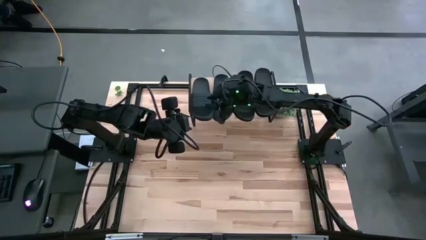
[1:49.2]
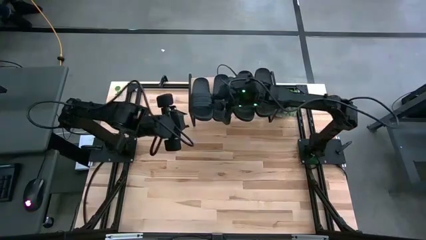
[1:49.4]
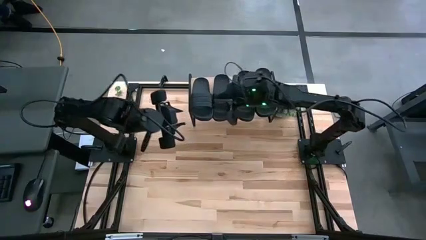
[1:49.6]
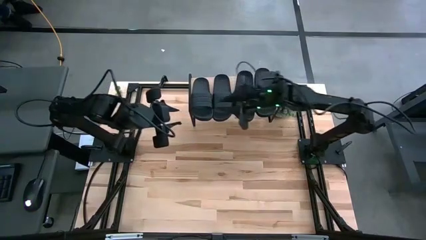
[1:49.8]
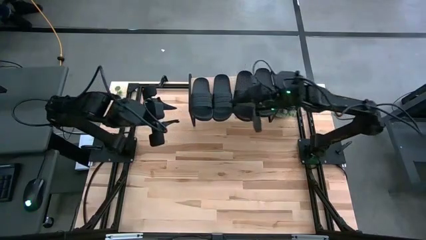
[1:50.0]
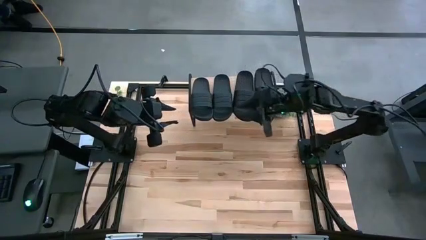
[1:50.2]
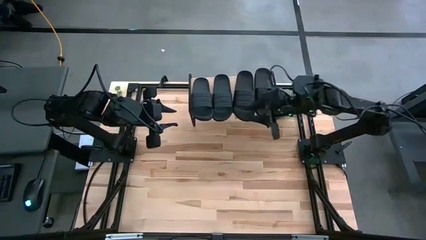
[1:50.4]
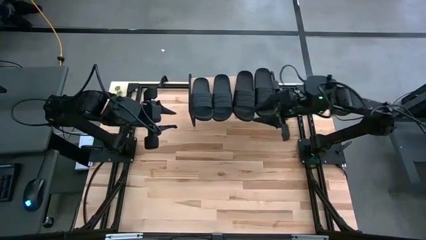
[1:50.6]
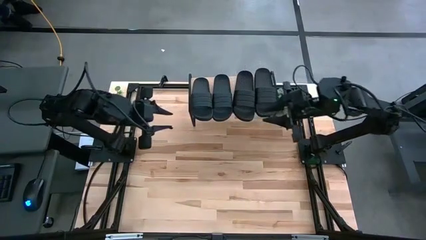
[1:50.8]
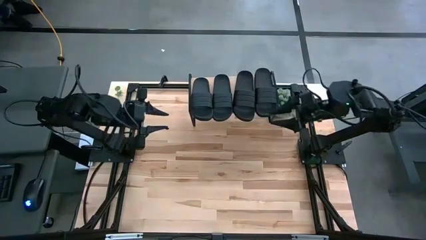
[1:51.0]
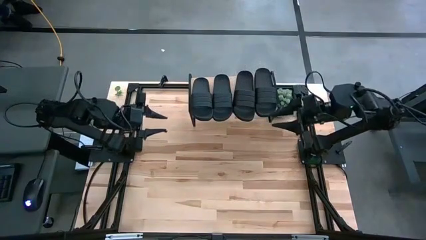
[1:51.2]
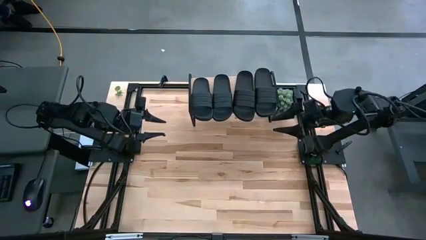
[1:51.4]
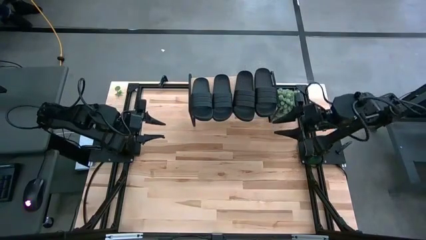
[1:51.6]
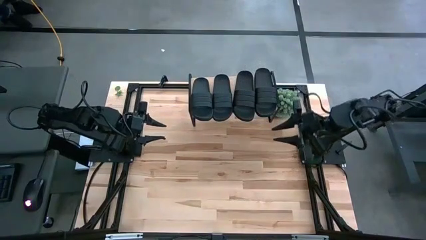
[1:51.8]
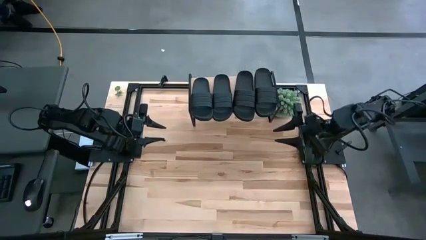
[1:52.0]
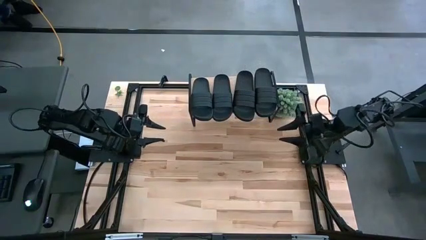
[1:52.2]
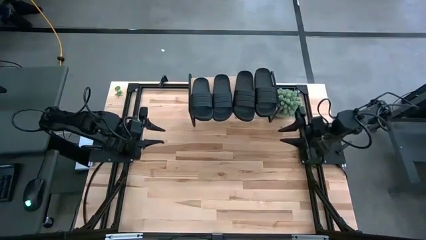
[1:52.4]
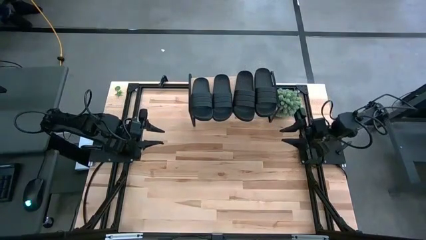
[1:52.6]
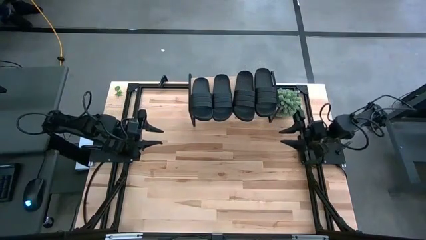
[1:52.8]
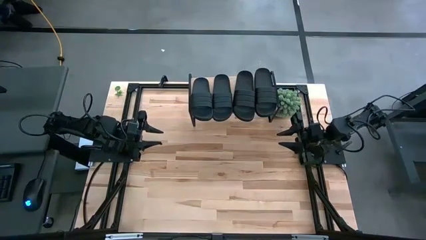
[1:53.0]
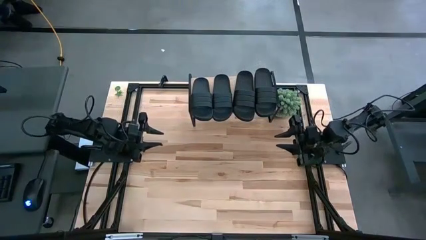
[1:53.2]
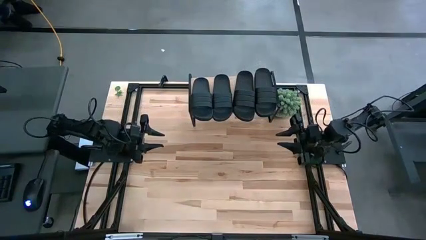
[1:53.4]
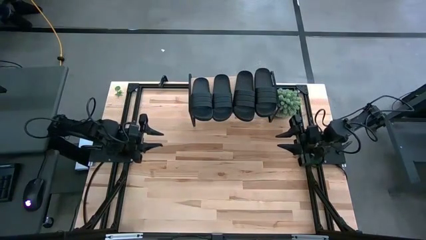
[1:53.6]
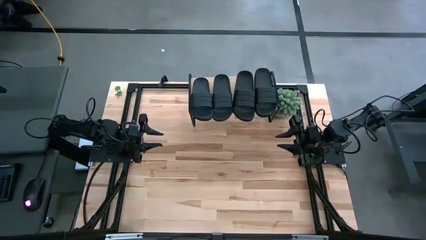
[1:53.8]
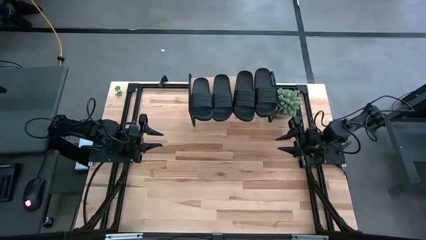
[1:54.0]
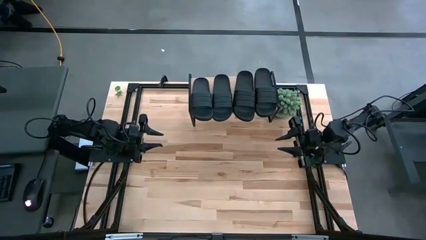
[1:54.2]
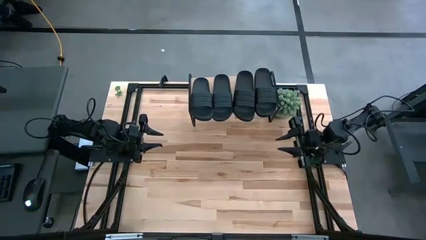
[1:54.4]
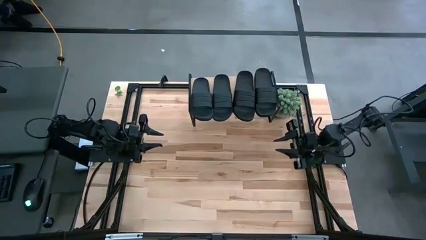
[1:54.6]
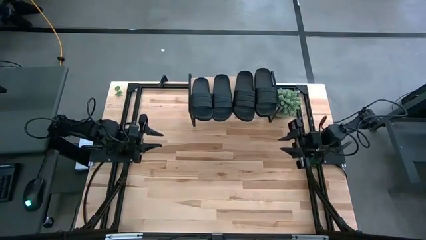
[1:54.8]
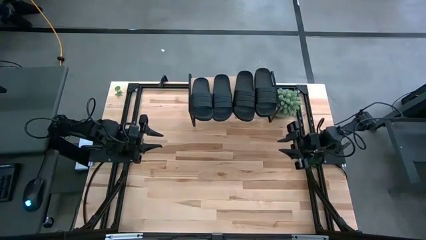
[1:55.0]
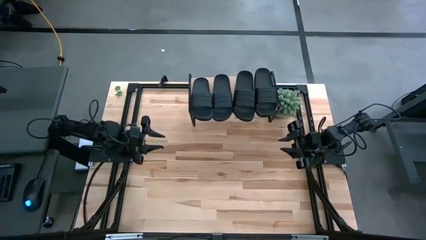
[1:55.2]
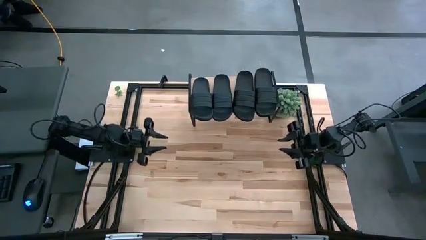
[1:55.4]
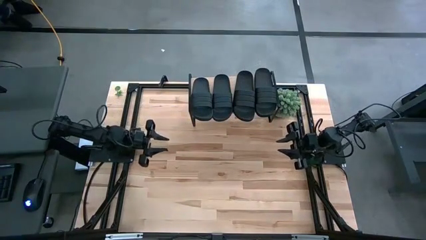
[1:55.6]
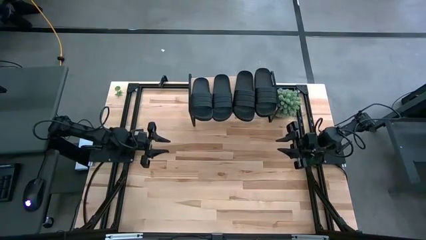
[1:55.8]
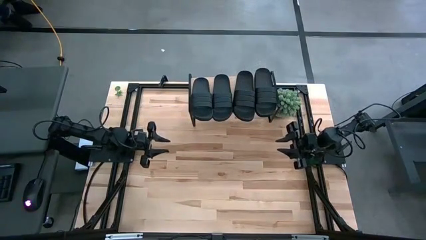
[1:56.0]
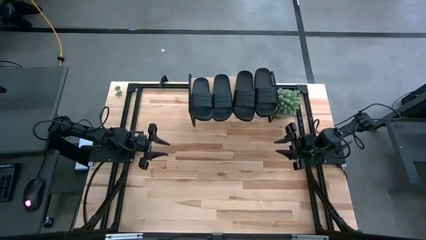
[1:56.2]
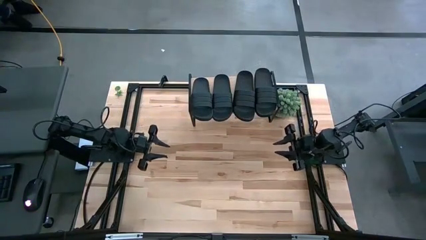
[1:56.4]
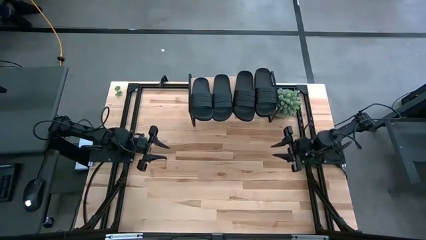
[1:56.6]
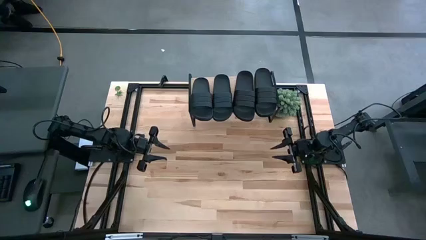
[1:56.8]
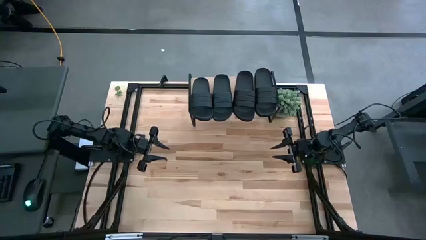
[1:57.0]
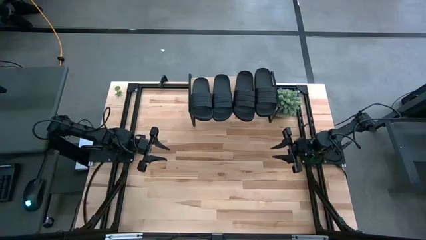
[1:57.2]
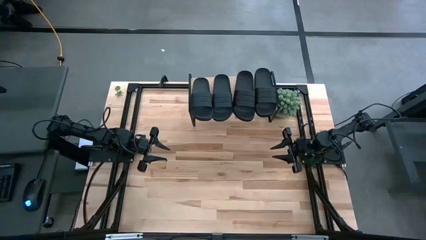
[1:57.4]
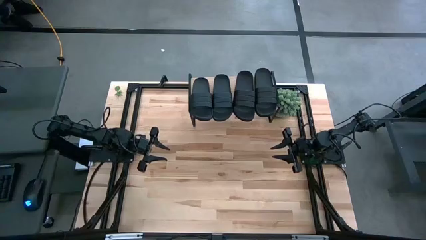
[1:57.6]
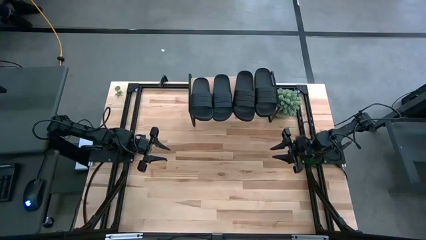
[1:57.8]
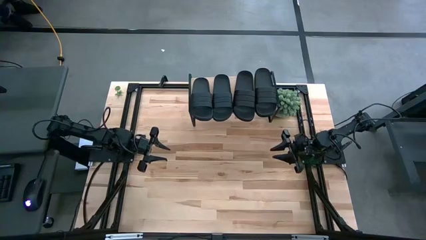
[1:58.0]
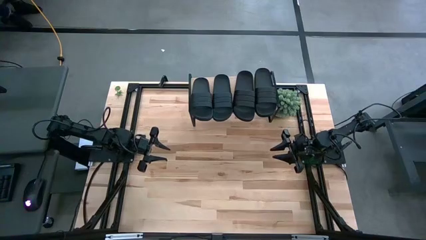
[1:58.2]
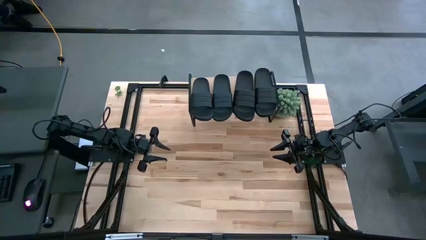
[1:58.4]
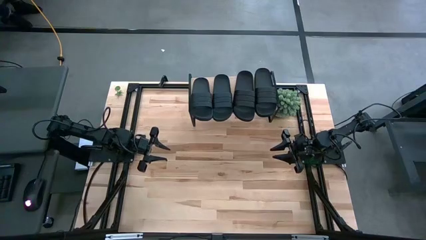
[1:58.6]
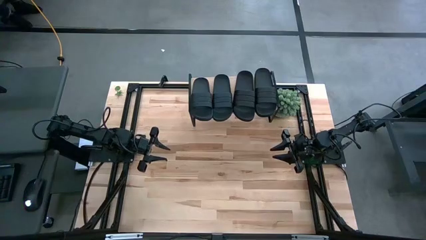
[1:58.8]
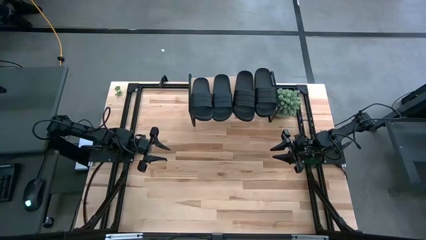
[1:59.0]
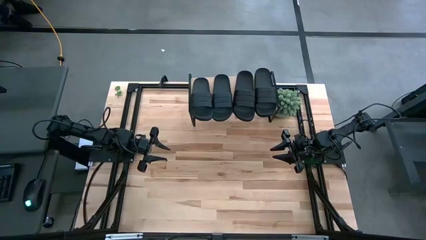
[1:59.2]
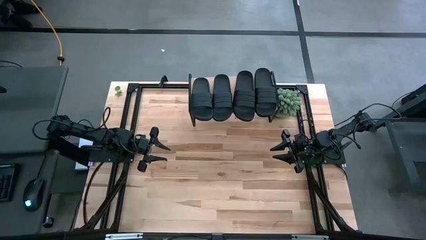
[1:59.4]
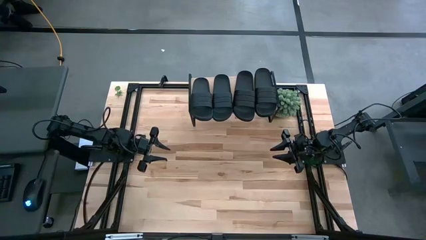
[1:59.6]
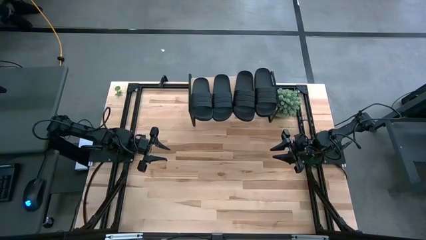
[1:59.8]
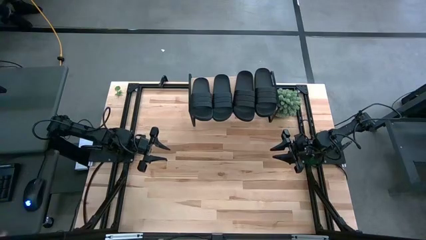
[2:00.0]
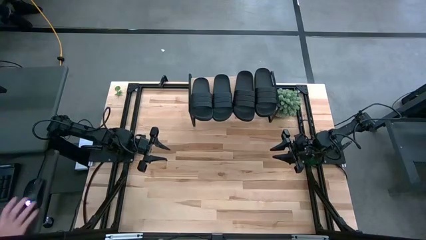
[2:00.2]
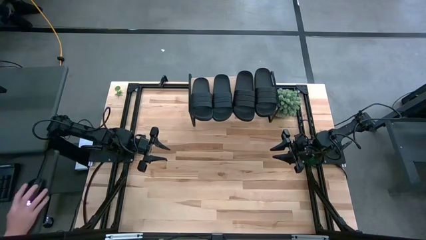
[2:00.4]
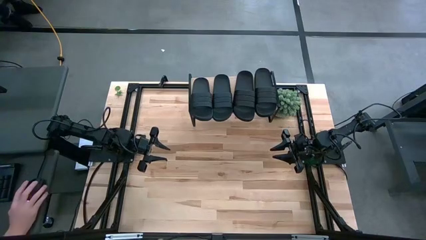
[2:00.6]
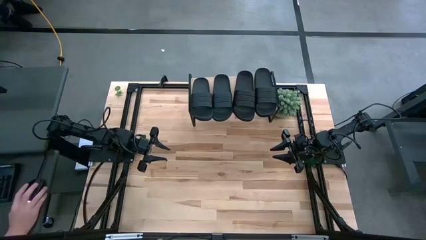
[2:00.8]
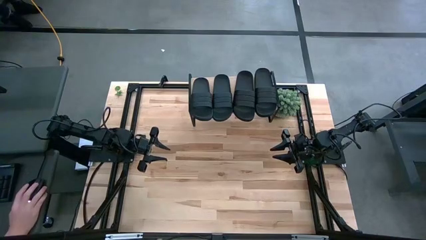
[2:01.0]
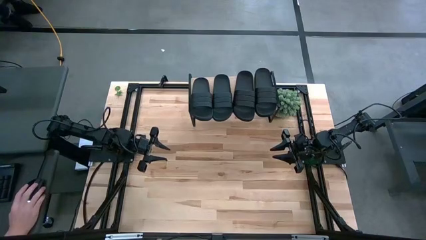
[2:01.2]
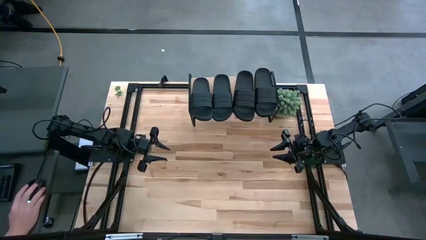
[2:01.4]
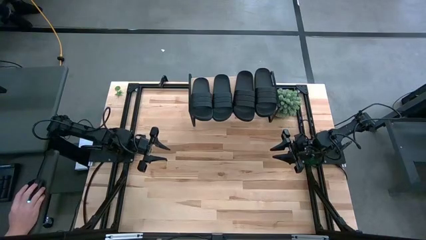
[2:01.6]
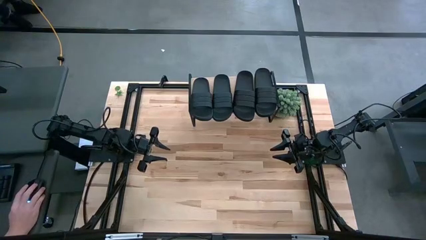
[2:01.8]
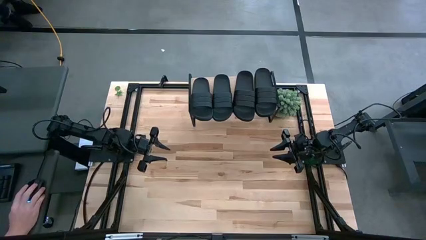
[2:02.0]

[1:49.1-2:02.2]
Task: Pick and place slides into the shelf
Return to Home Position

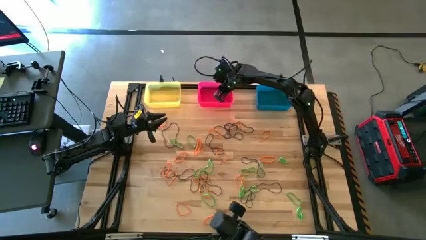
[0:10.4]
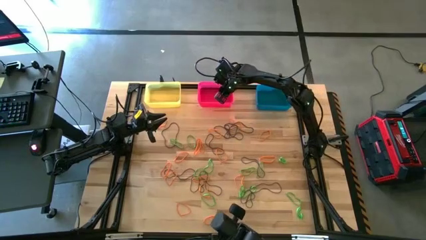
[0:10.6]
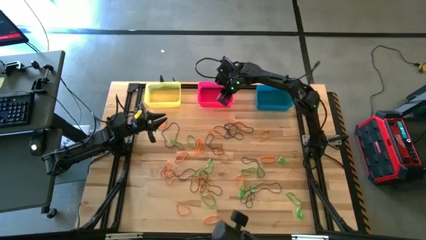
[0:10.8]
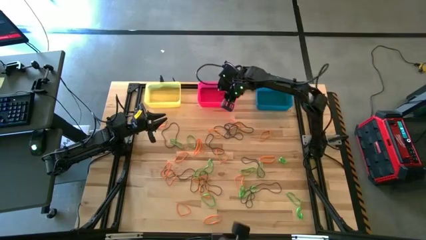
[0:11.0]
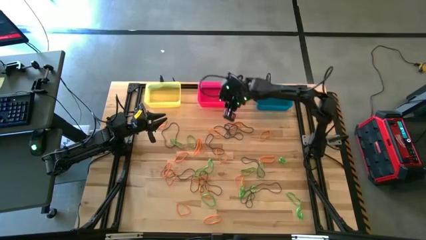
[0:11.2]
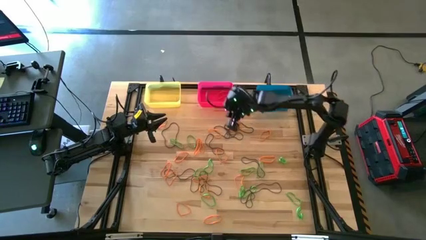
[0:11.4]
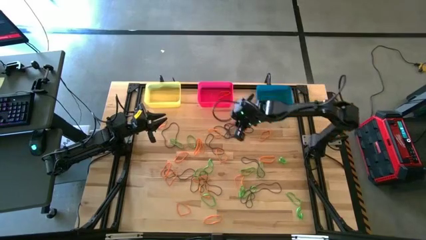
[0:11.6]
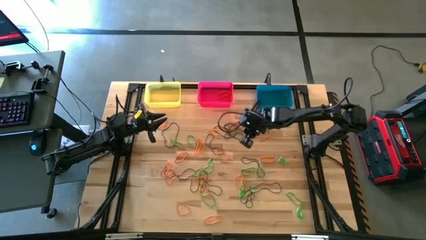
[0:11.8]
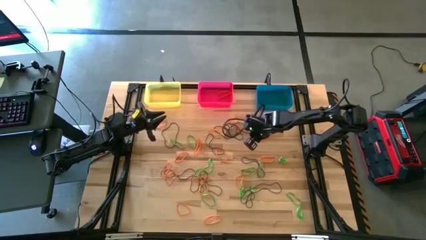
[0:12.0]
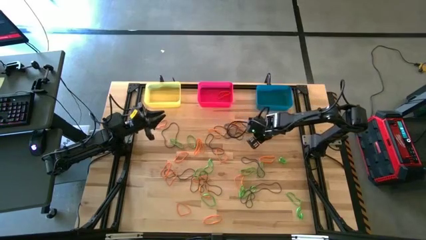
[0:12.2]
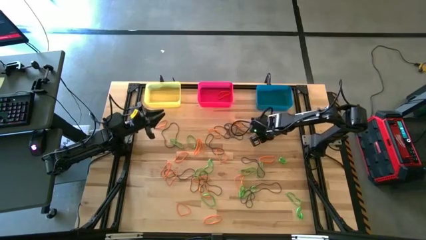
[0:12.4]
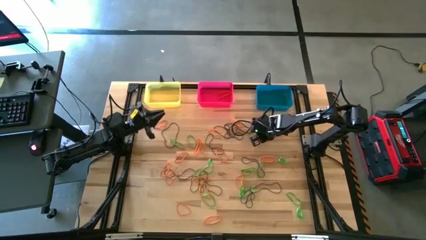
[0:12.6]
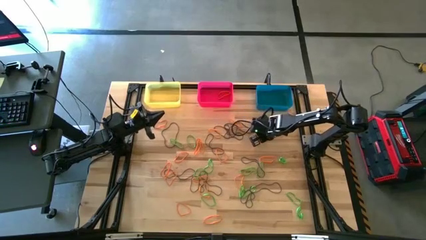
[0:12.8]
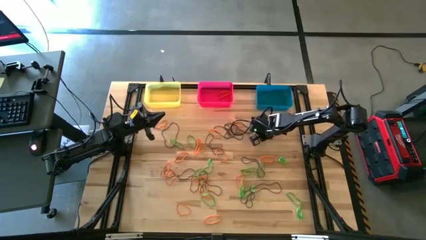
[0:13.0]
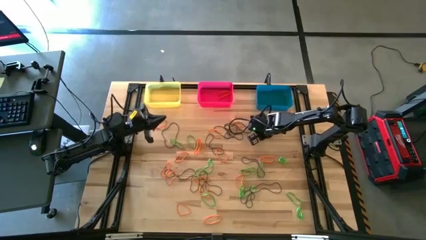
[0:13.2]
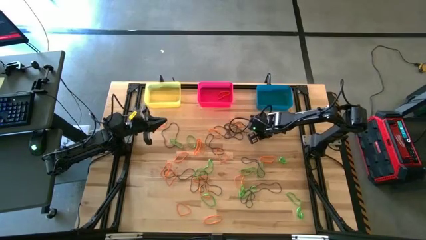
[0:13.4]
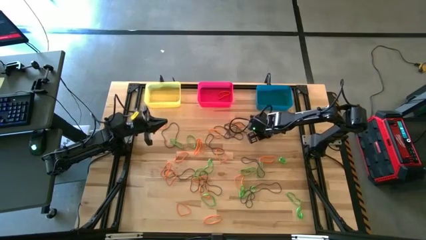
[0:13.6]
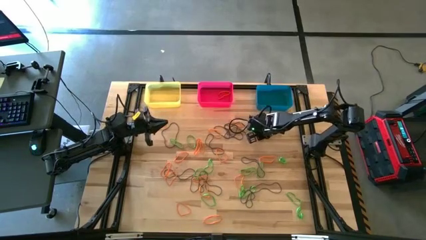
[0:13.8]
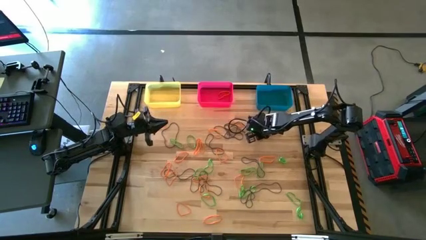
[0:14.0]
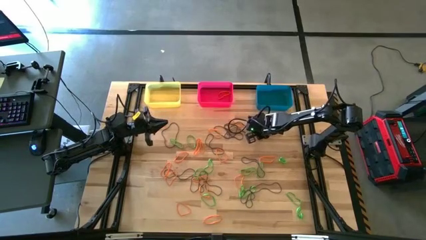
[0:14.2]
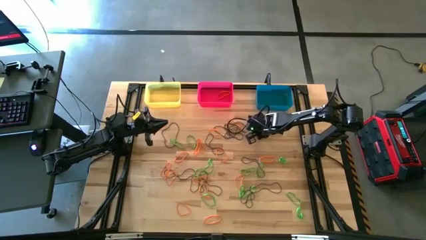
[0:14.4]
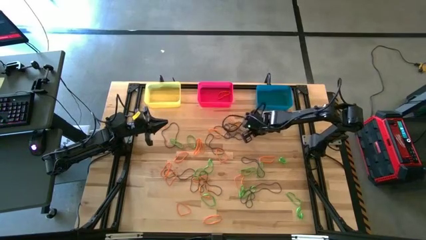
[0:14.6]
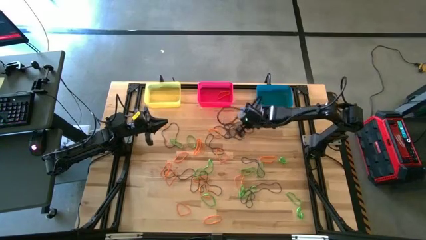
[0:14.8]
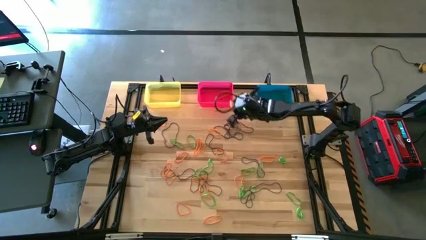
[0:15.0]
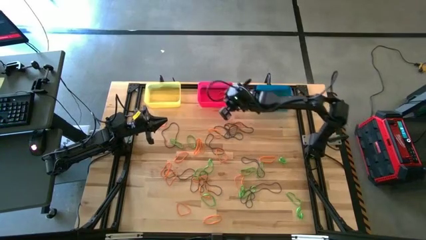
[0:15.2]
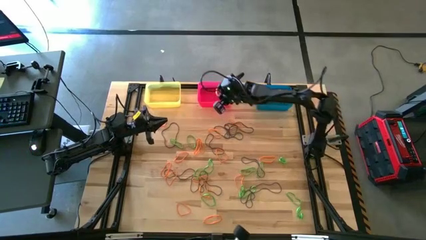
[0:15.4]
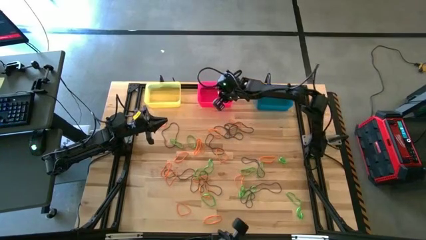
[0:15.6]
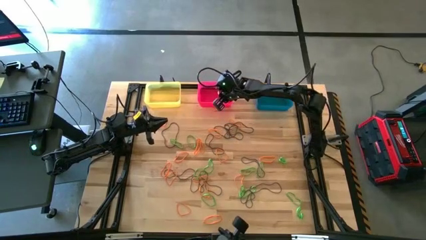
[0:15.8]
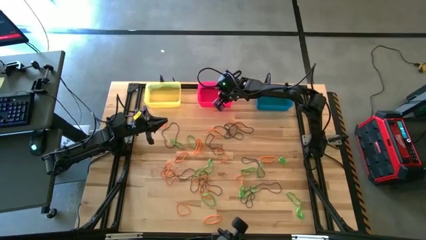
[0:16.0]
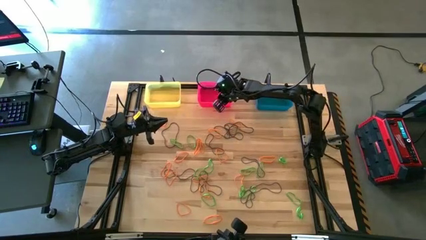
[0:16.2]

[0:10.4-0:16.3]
Task: Sort rubber bands into baskets
Put the orange rubber band into the pink bin
